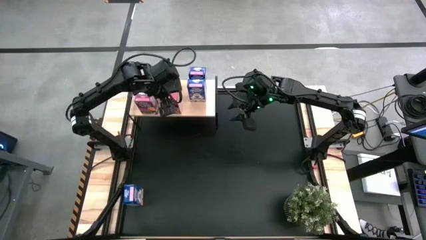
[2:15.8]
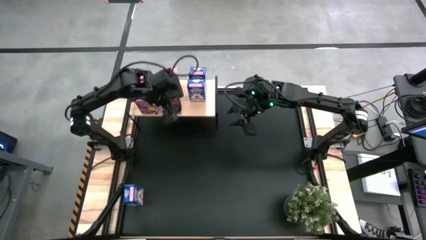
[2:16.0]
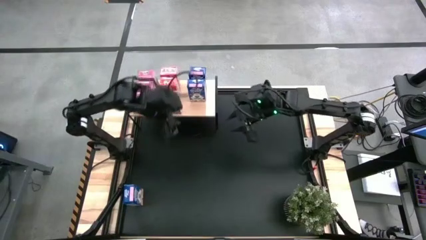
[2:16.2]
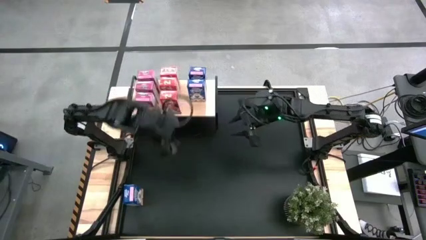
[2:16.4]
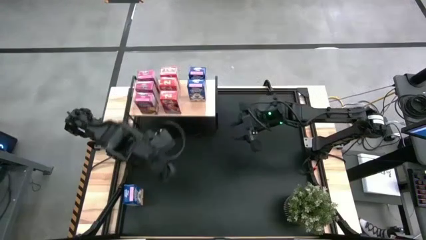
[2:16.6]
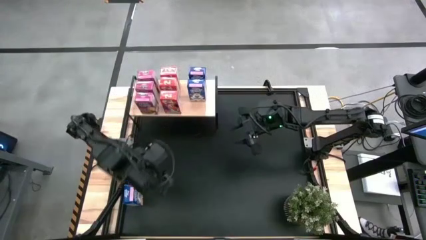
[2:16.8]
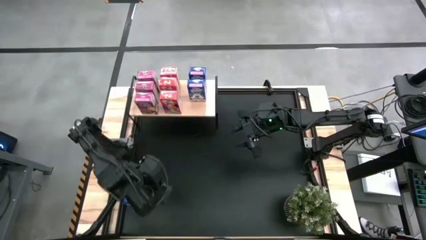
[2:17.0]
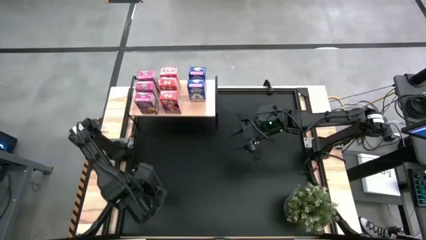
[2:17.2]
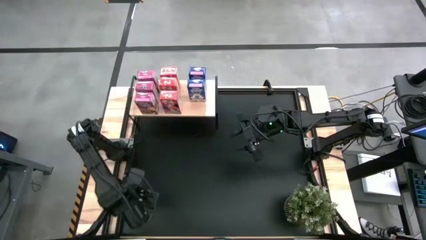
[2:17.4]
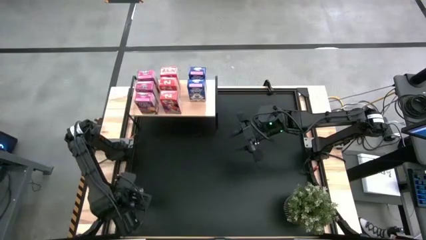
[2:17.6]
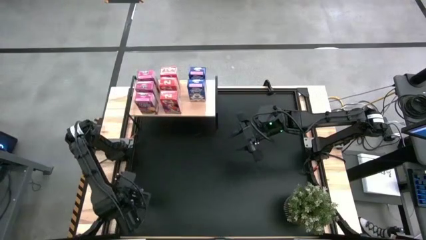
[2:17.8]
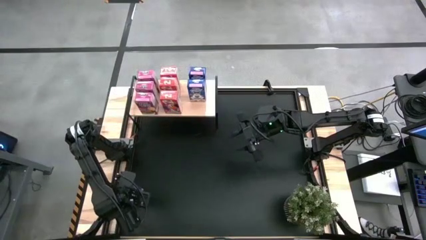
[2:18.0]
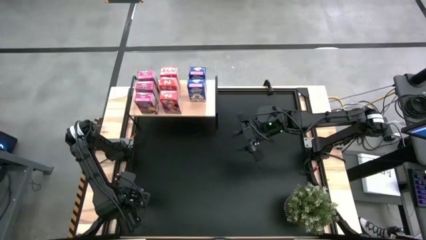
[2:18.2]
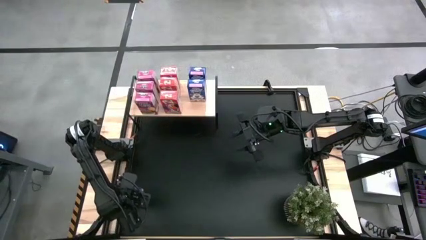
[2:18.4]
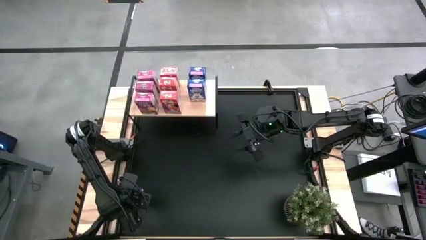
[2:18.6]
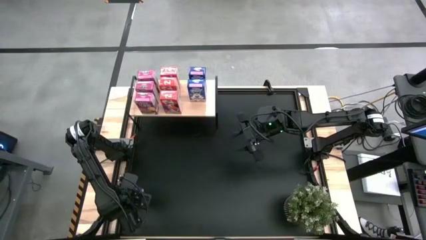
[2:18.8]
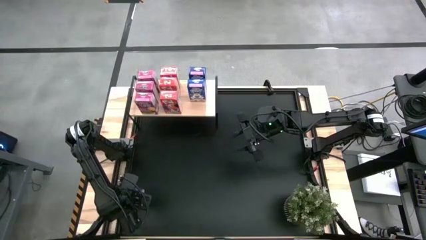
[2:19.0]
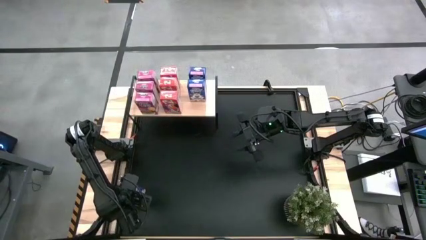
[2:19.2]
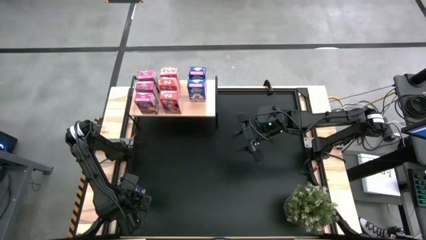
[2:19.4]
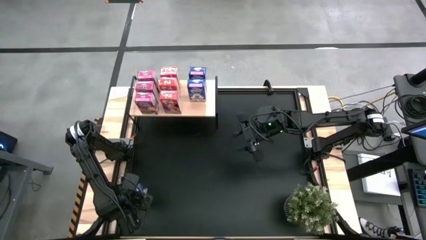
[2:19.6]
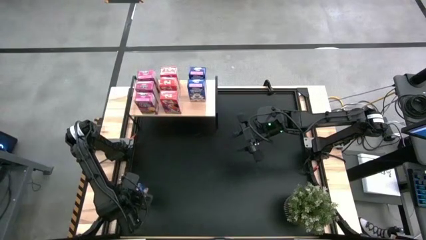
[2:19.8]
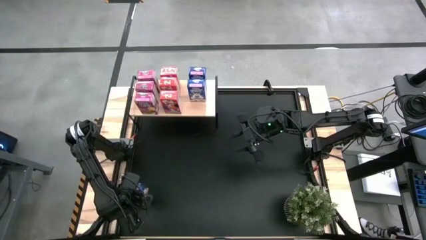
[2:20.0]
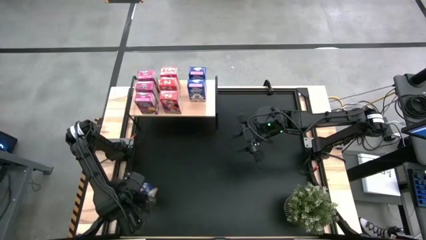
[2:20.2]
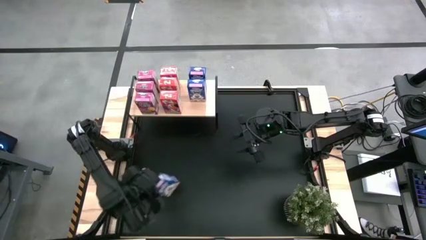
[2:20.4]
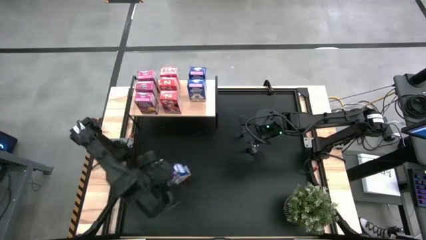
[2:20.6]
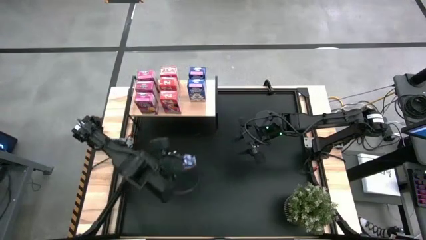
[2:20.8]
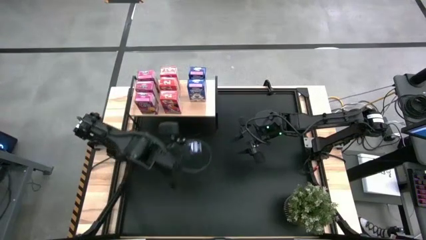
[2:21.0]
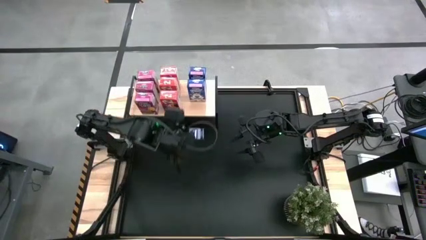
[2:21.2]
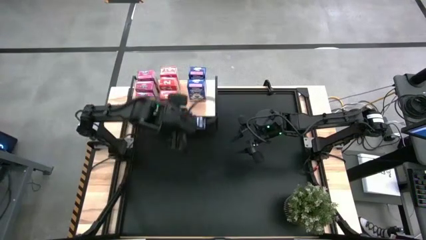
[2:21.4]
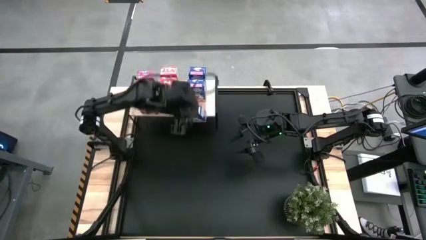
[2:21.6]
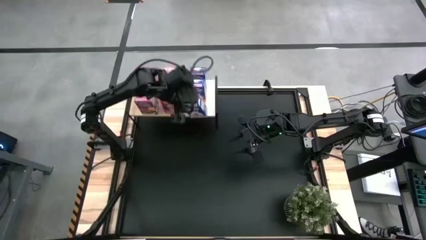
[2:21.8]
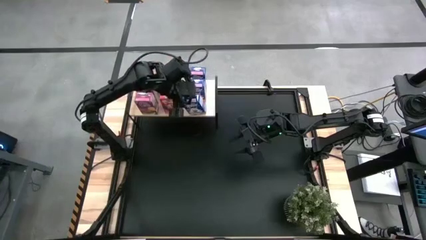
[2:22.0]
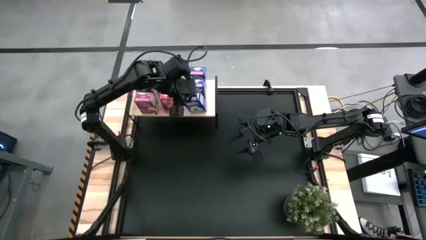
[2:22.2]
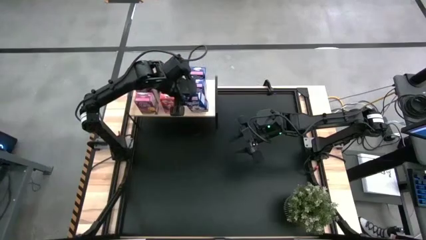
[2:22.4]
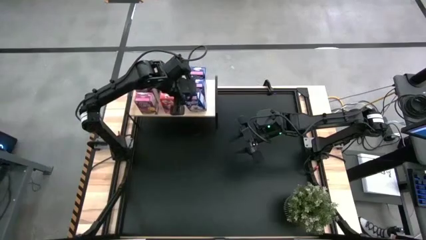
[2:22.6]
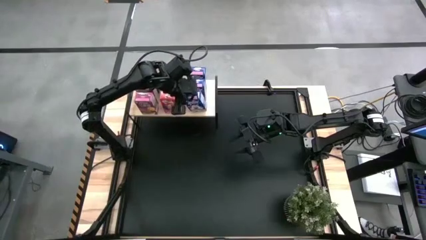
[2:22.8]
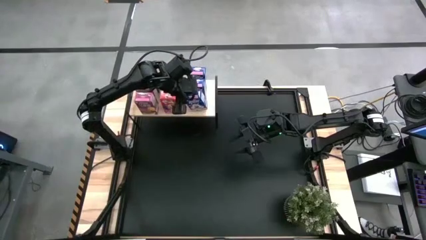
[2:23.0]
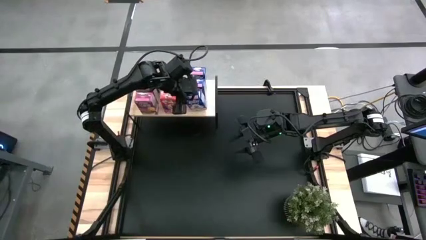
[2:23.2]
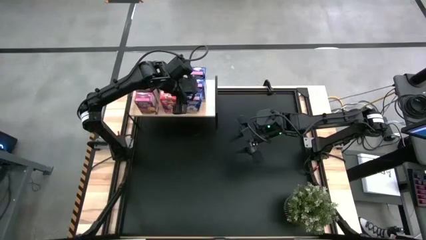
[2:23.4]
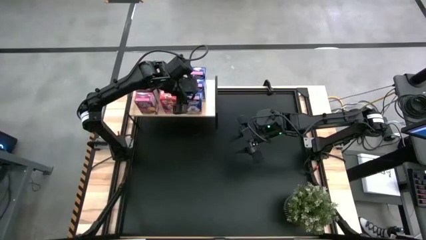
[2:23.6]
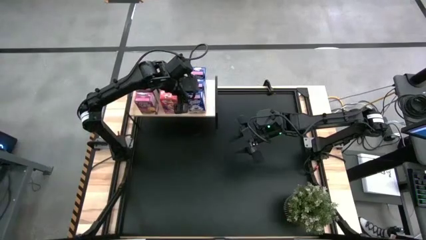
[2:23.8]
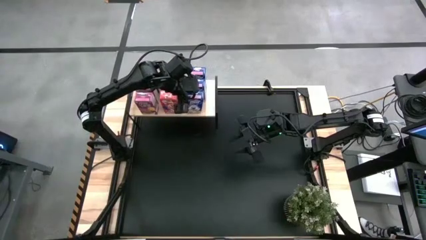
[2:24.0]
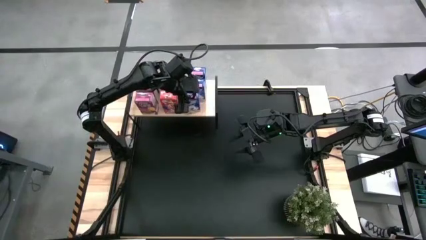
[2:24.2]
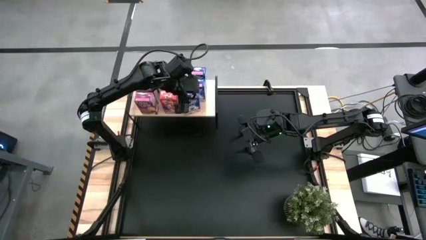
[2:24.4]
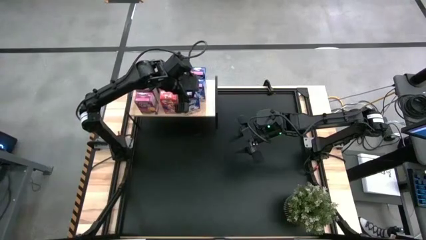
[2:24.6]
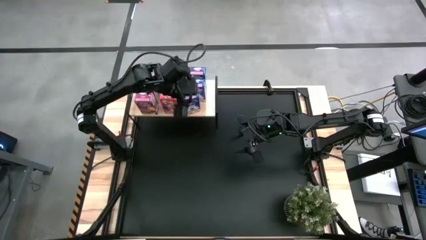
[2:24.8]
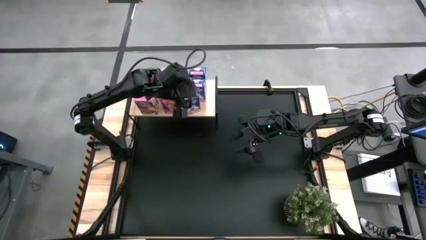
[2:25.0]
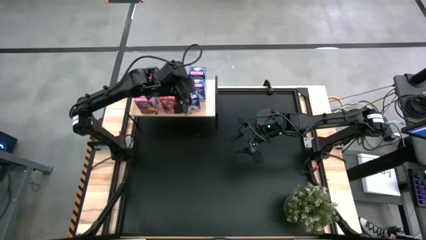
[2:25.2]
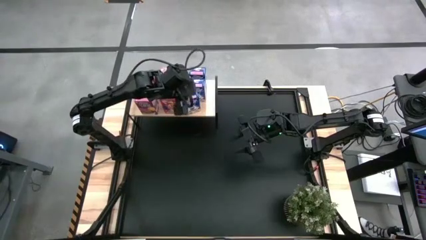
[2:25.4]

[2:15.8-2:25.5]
Task: Stack cereal on shelf
Align the blue cereal box with the other blue cereal box on the shelf

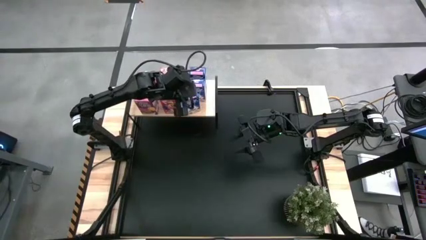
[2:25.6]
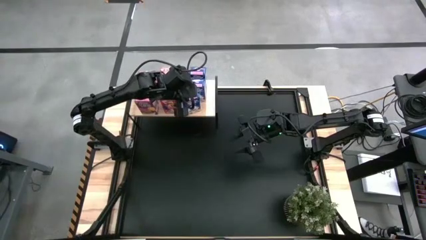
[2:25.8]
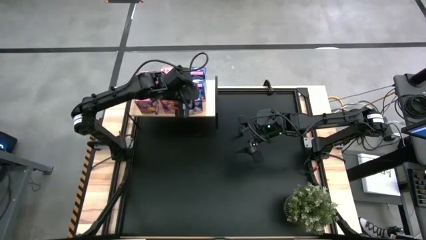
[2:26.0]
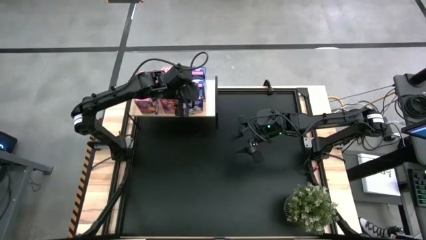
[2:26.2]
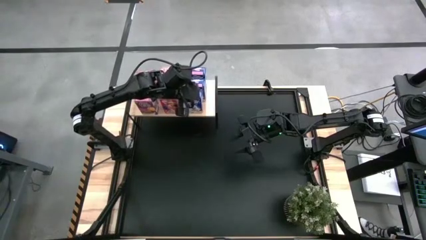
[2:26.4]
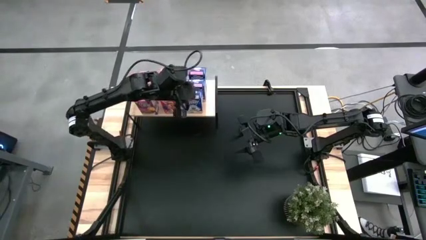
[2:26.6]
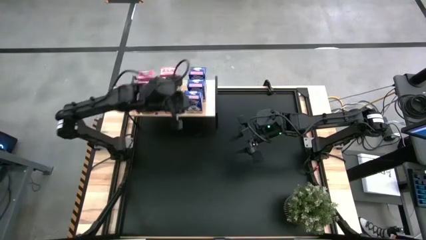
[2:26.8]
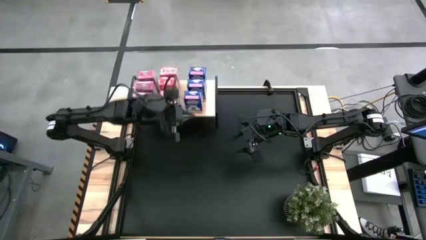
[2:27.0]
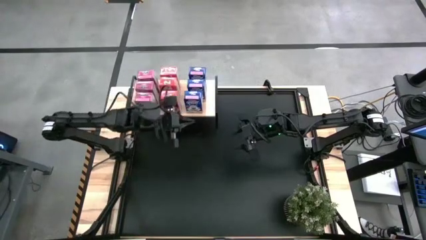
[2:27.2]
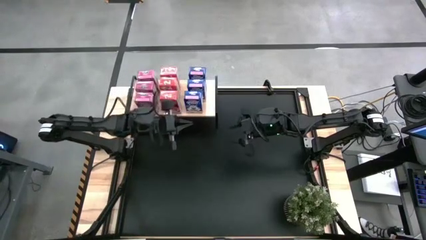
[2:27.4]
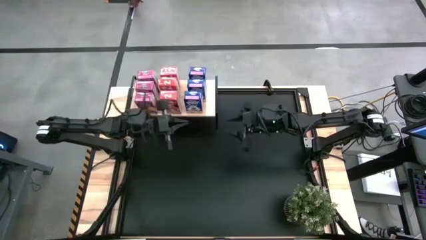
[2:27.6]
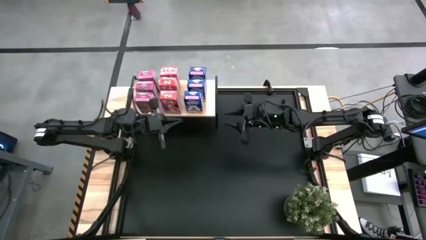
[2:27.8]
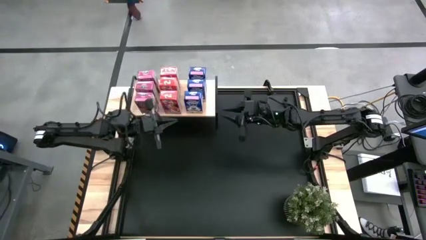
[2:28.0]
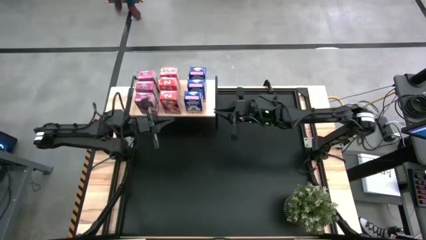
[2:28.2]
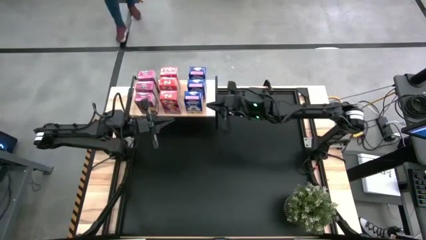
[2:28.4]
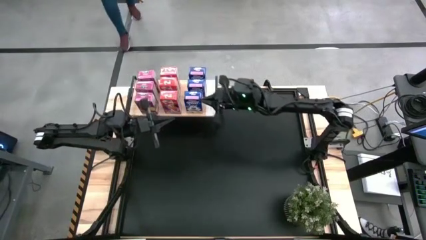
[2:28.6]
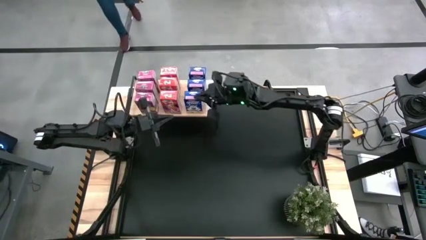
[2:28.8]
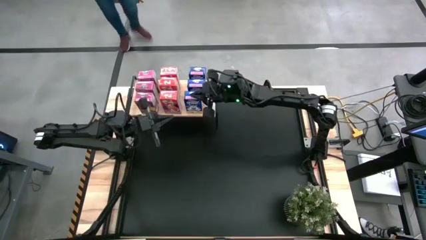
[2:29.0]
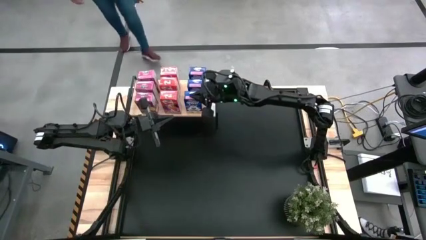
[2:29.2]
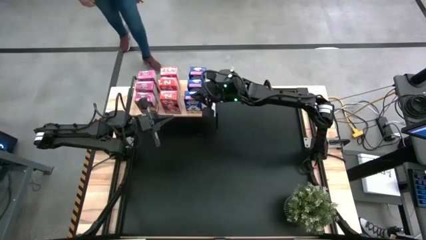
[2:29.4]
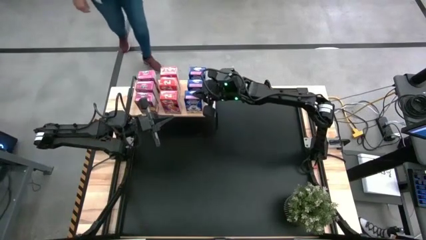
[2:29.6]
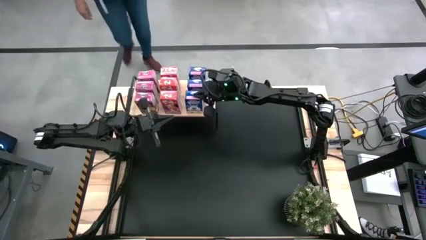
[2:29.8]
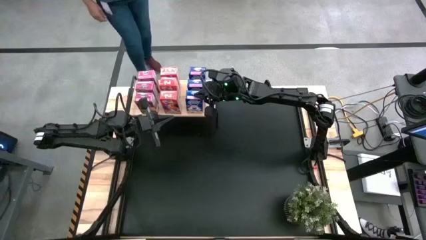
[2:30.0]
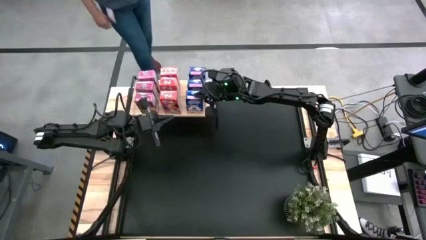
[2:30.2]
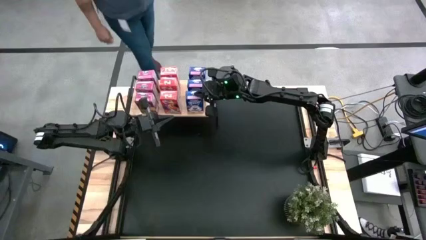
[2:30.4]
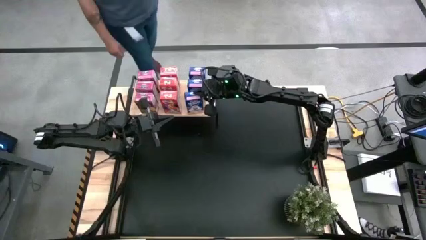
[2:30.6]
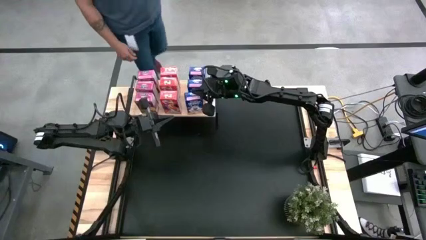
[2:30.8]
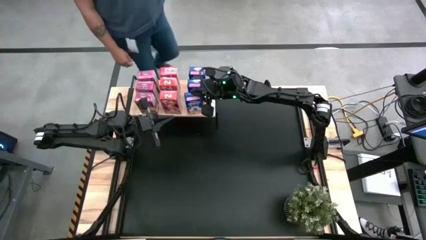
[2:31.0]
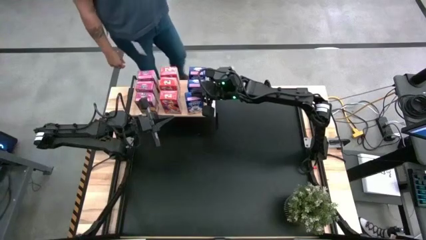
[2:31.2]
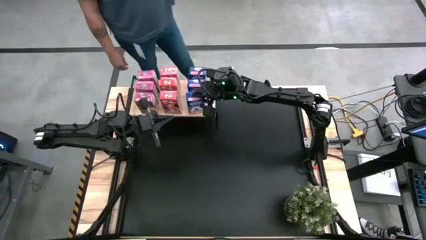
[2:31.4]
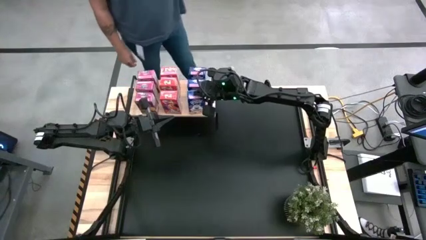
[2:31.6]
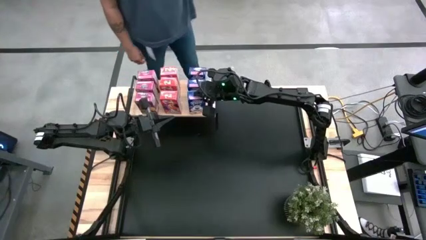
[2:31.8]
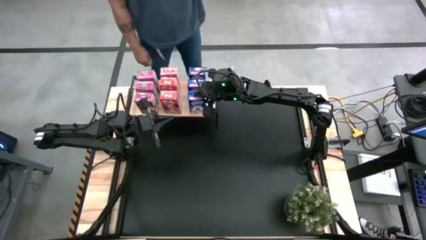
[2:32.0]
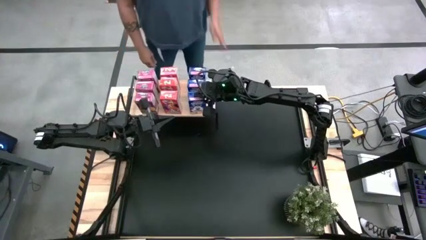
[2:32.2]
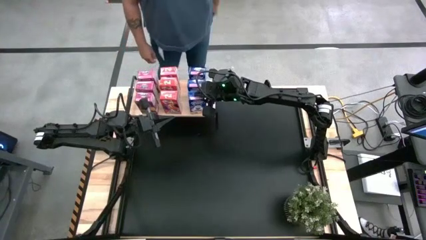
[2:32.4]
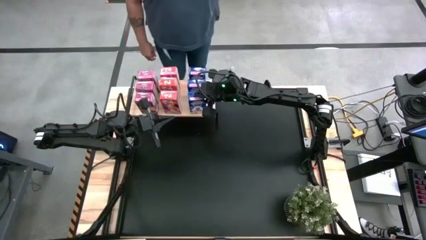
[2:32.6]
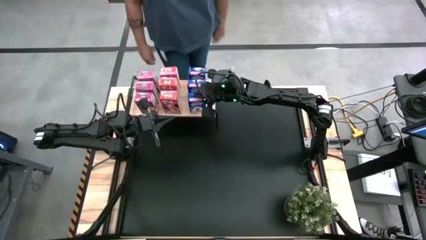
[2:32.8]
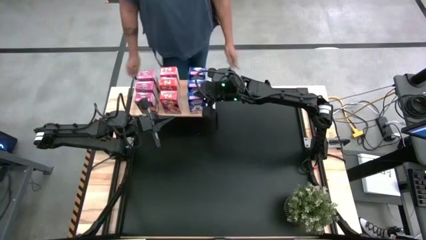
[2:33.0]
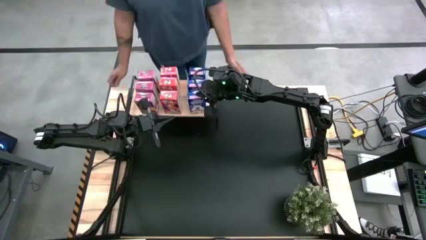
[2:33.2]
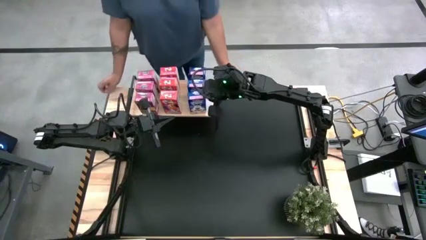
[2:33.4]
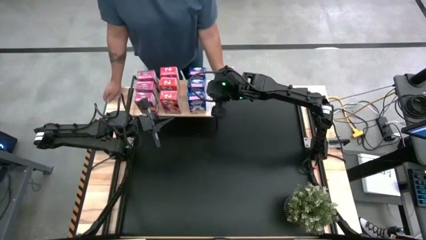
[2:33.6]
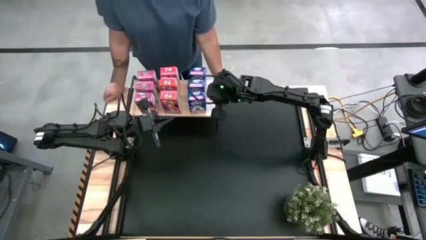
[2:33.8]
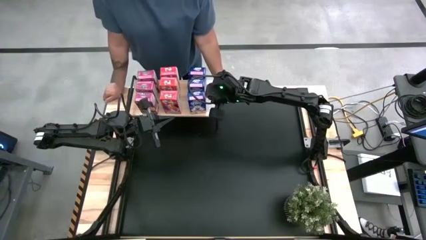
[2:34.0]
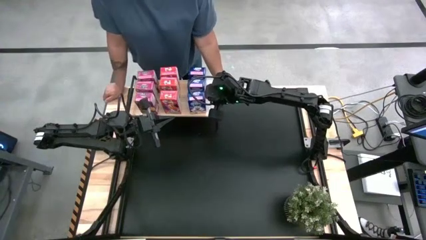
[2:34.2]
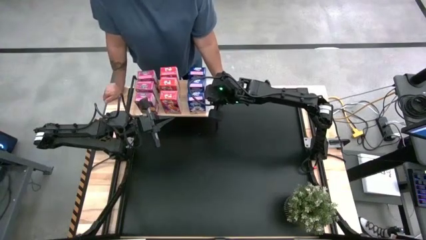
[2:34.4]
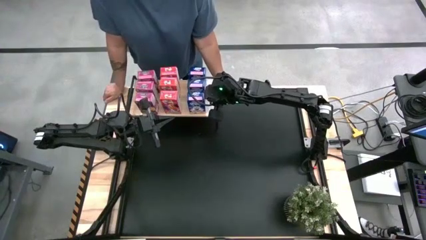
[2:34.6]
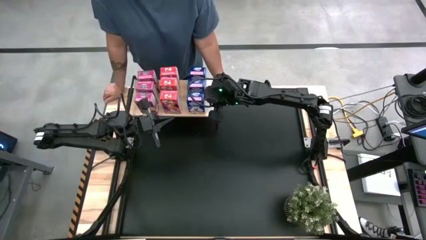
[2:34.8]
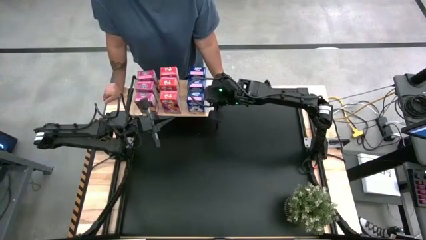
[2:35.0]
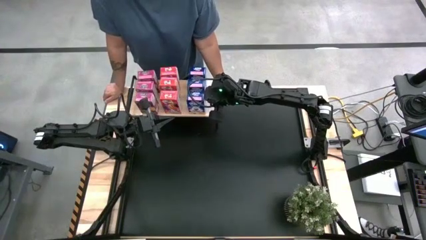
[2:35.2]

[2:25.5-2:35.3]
Align the blue cereal box with the other blue cereal box on the shelf
